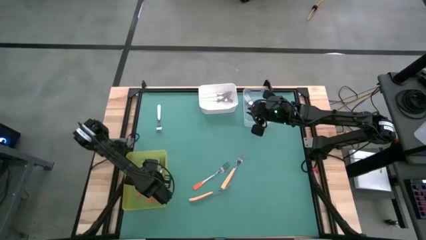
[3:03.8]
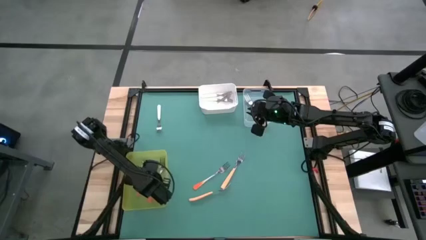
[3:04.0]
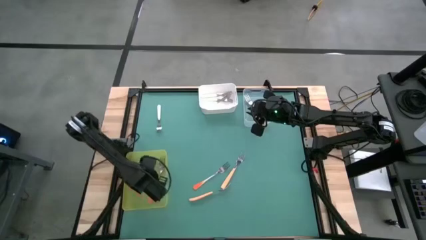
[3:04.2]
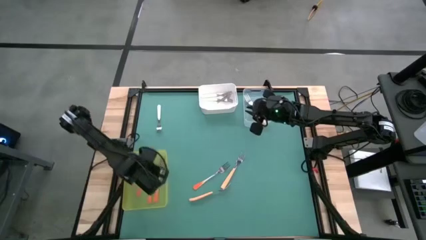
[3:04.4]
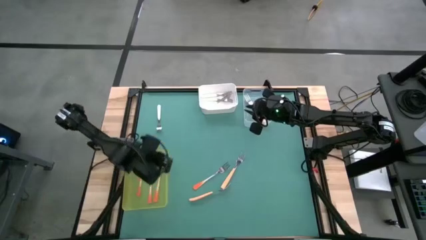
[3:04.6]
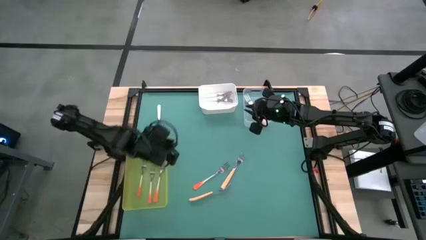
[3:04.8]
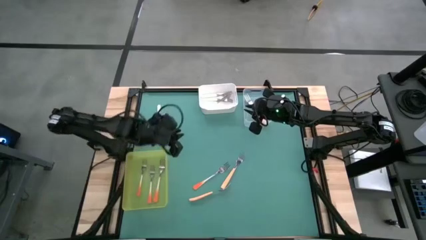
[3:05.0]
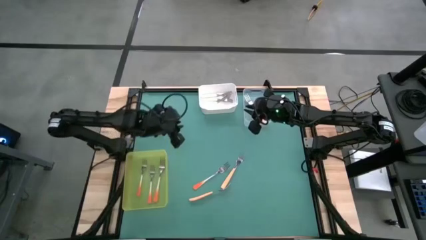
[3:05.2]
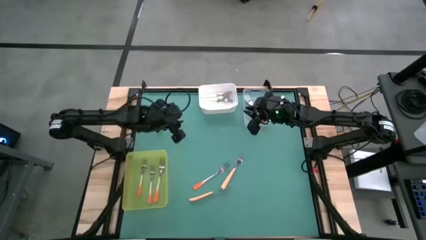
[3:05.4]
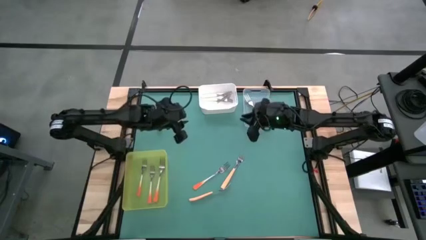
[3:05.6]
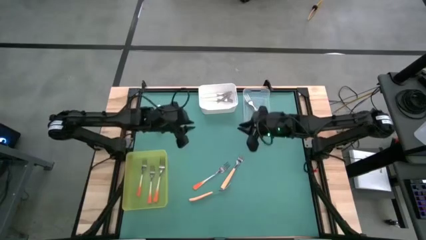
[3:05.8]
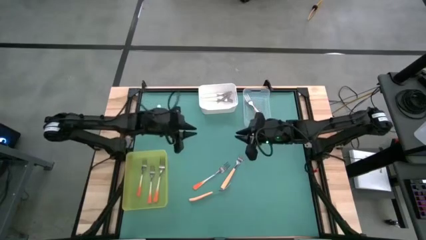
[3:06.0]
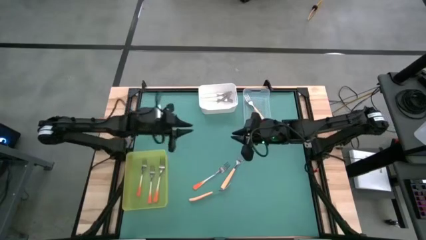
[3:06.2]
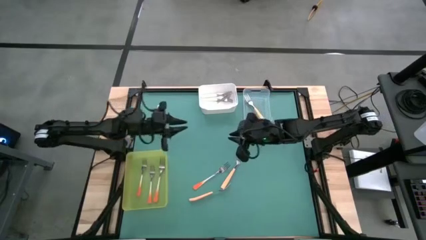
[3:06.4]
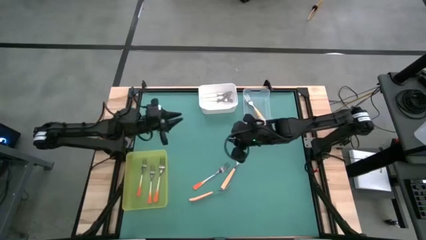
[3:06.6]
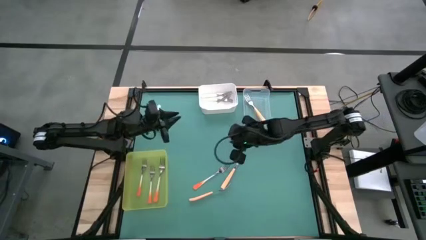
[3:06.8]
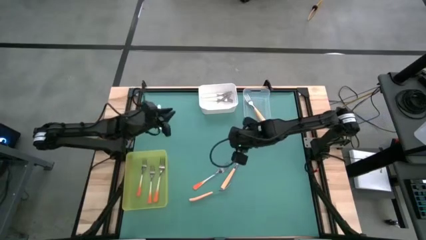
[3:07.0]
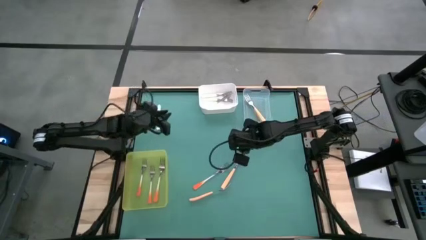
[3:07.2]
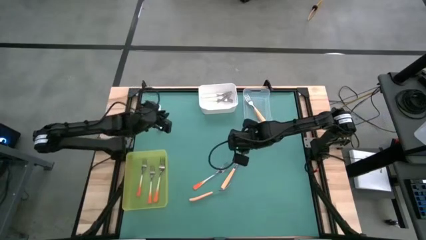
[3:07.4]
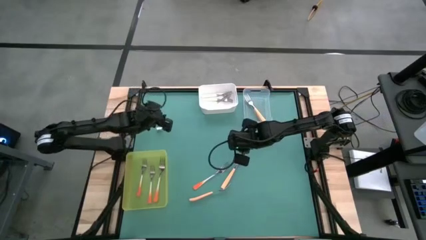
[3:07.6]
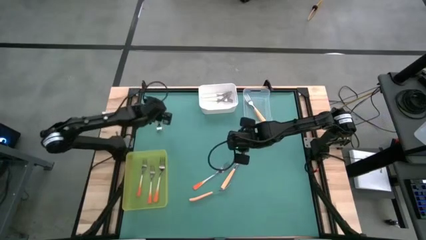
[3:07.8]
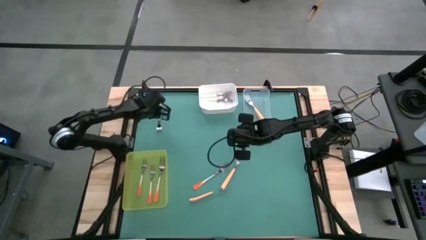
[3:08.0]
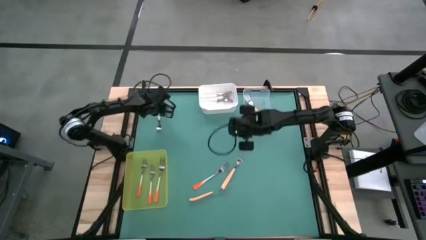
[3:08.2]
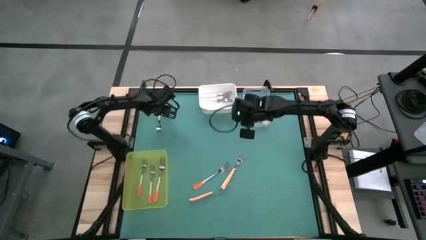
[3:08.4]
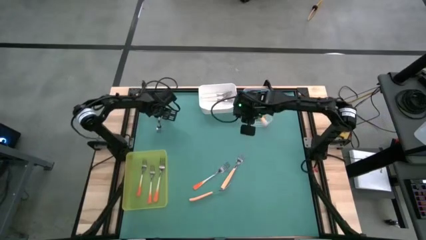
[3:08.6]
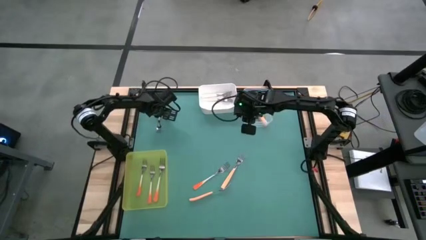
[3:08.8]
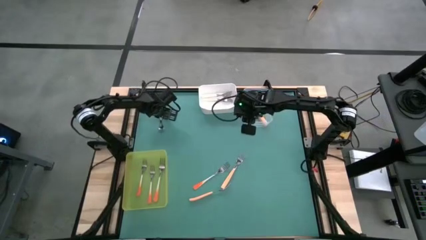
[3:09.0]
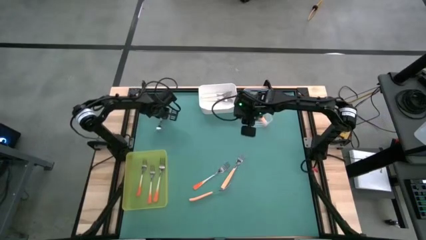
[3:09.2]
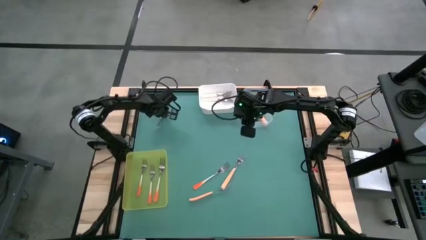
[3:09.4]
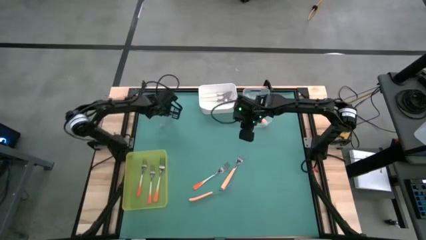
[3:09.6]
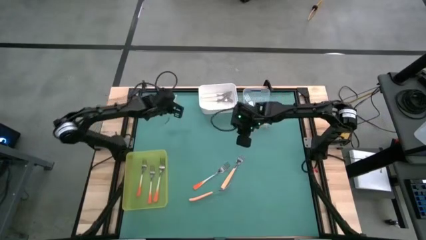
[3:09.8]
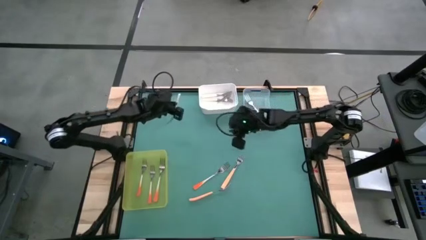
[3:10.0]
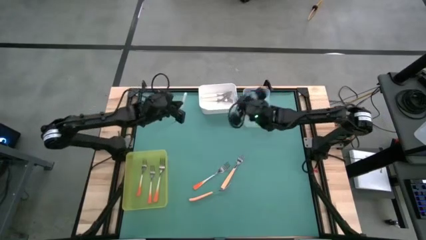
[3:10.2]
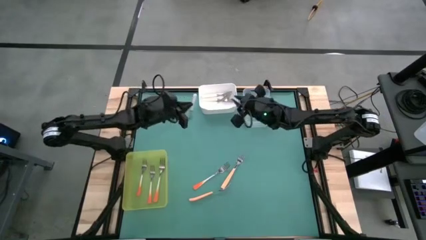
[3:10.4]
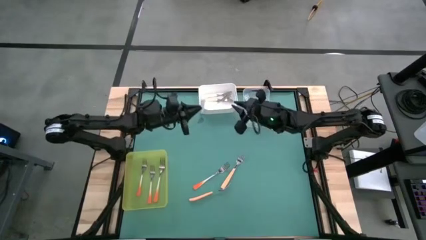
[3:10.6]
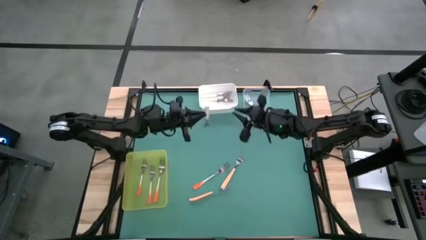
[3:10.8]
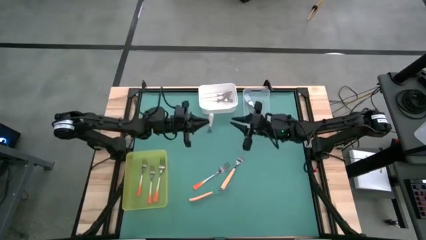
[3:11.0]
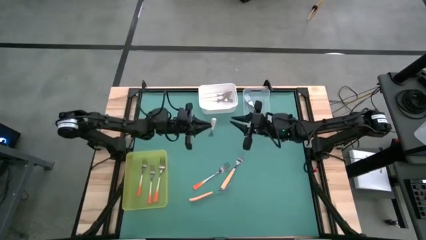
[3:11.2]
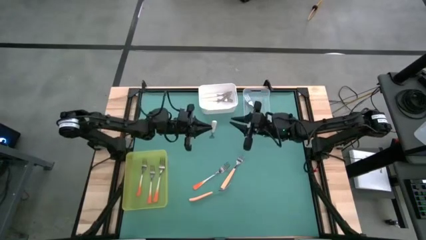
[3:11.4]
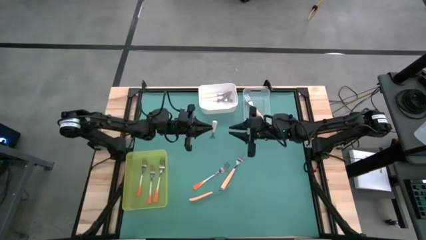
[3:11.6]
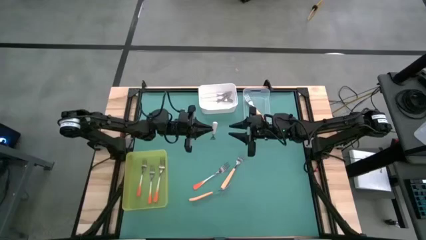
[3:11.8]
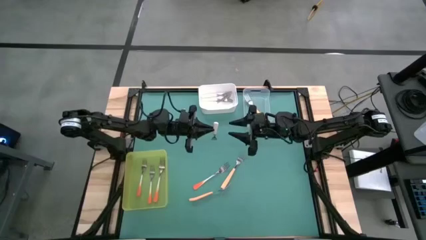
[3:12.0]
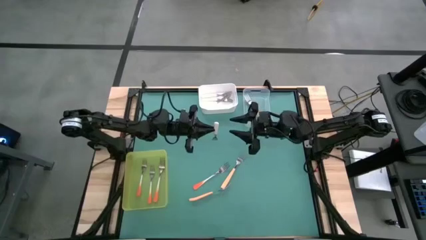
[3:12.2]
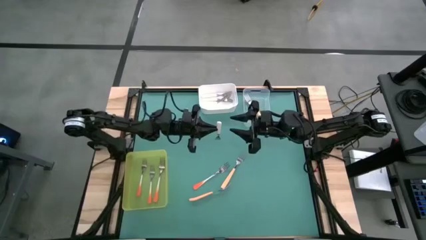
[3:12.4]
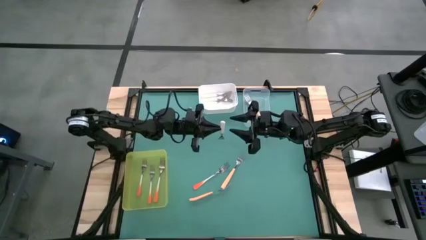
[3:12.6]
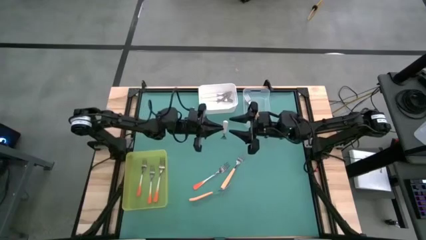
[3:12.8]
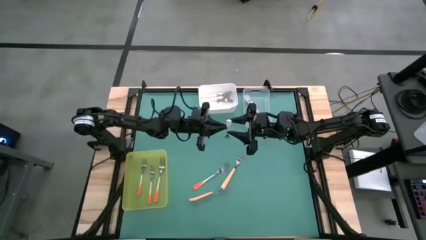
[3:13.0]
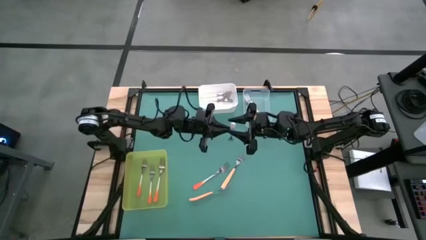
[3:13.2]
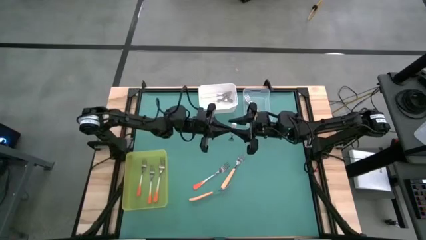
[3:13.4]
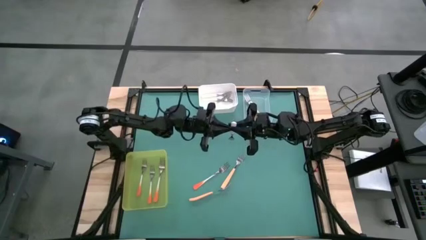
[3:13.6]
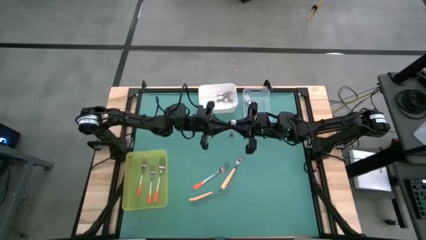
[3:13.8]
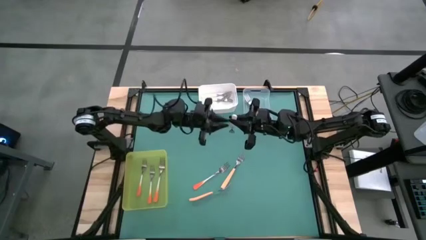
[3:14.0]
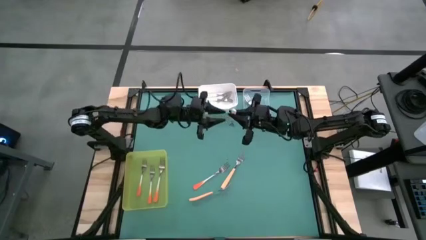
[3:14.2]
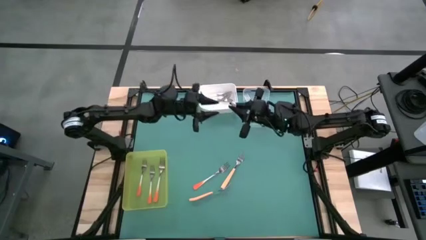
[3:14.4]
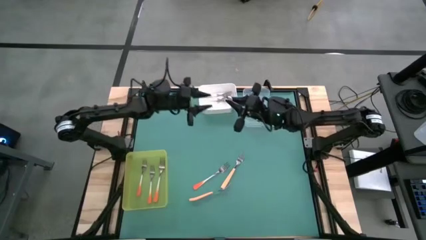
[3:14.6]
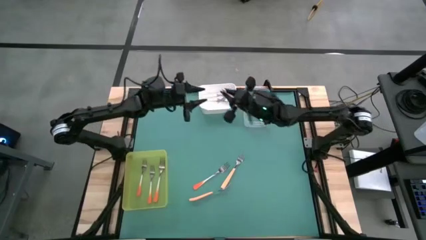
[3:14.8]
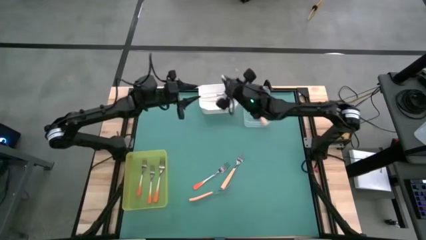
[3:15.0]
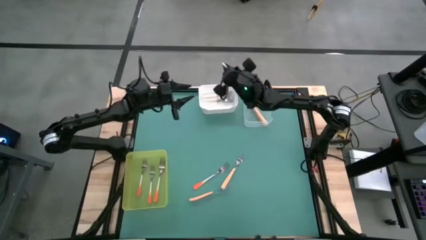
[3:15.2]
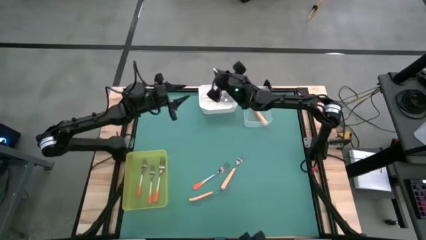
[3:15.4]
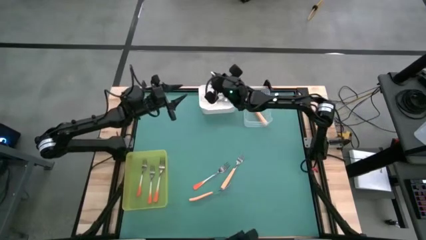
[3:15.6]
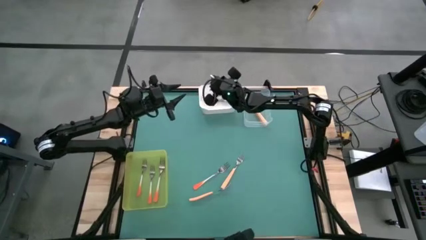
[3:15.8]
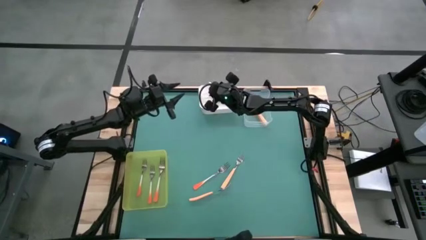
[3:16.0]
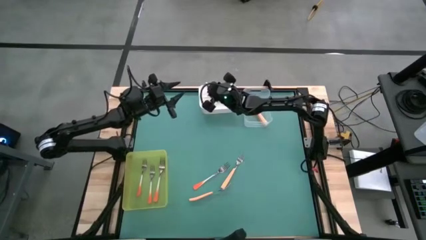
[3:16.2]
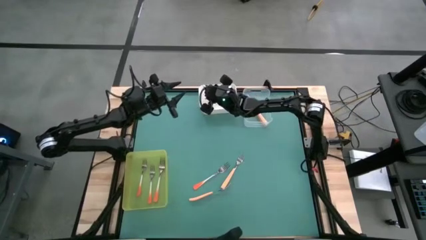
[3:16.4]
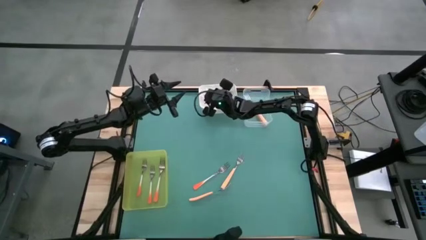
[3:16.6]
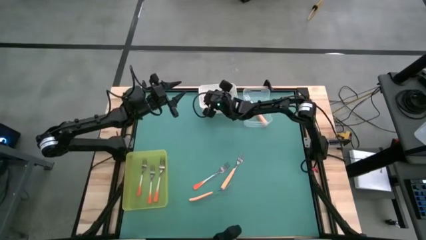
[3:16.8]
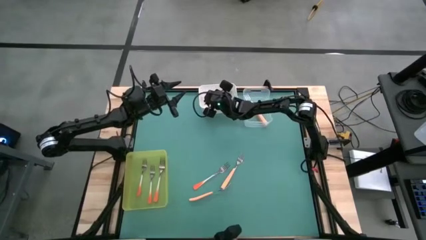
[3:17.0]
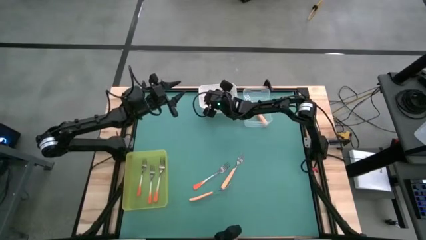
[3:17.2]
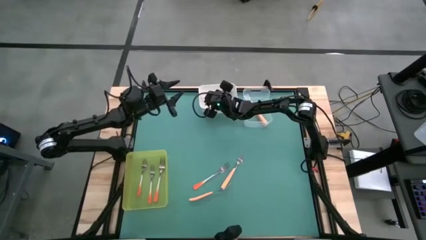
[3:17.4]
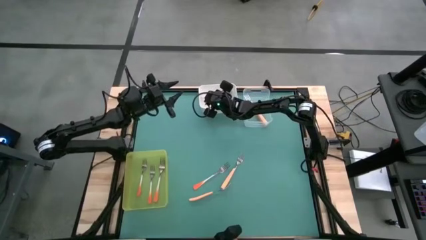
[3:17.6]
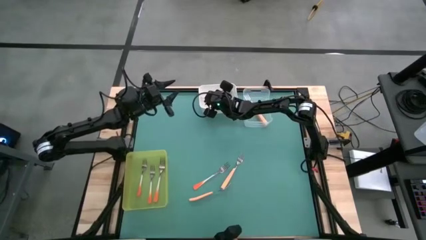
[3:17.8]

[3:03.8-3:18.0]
Task: Sort silverware by color (type)
Put the white fork into the white bin

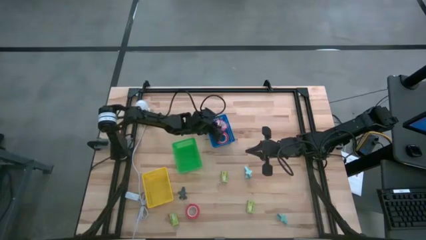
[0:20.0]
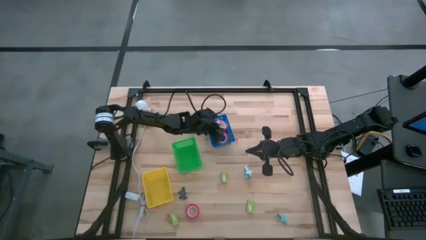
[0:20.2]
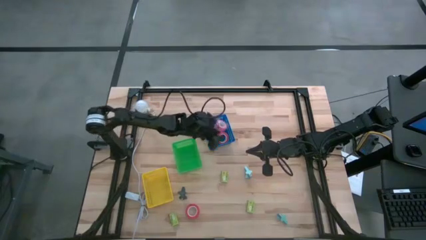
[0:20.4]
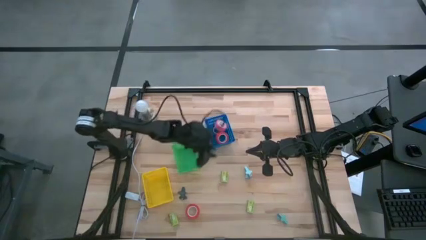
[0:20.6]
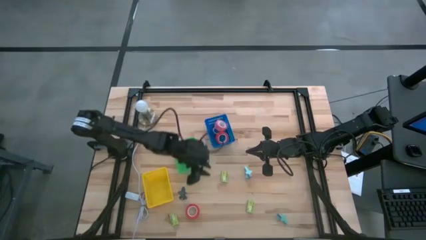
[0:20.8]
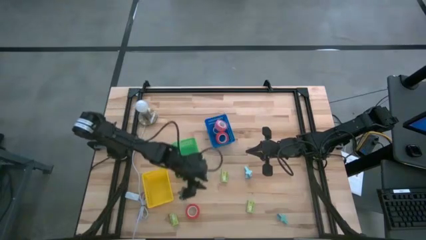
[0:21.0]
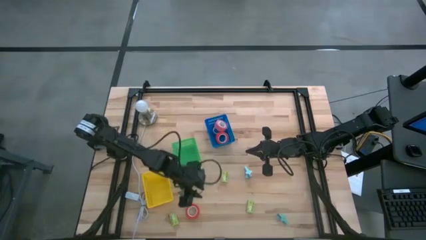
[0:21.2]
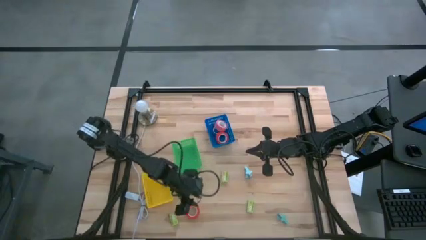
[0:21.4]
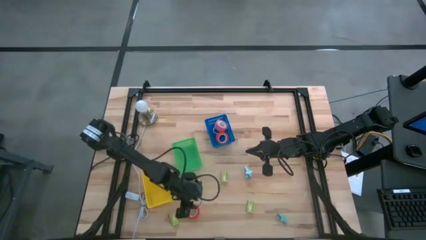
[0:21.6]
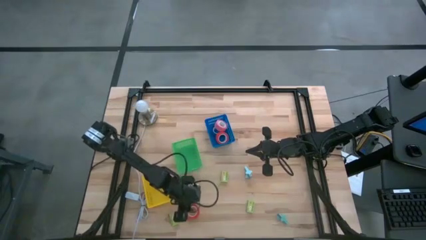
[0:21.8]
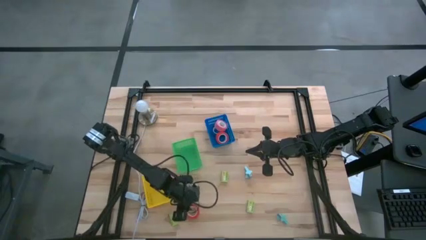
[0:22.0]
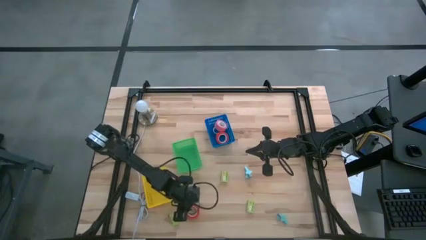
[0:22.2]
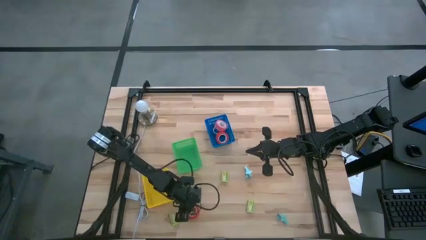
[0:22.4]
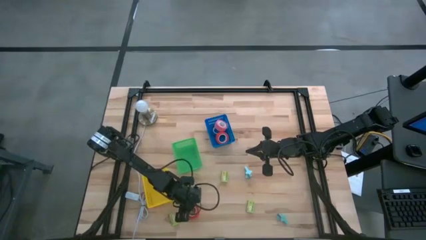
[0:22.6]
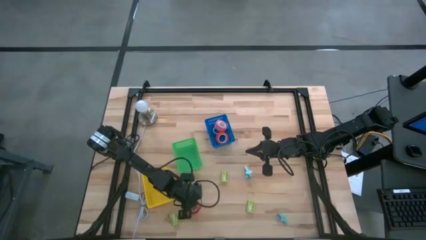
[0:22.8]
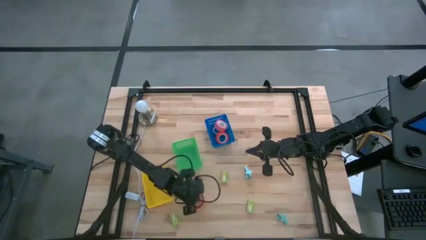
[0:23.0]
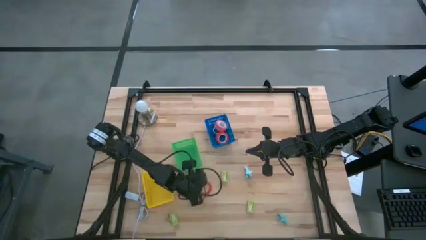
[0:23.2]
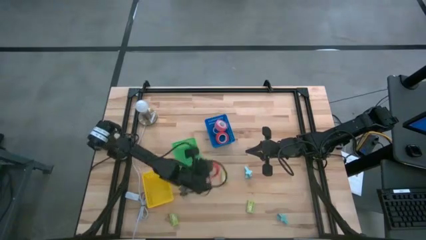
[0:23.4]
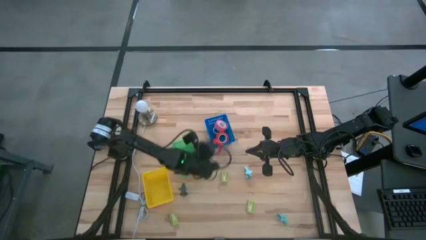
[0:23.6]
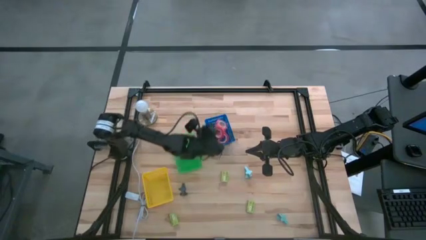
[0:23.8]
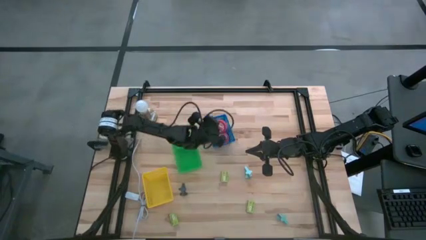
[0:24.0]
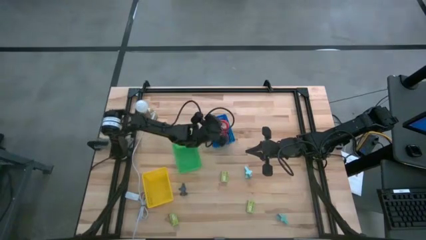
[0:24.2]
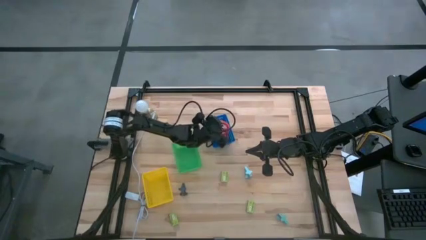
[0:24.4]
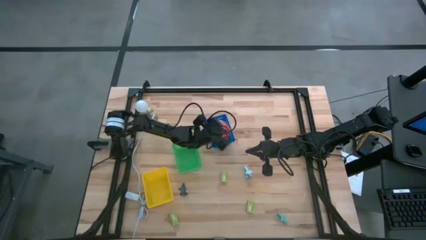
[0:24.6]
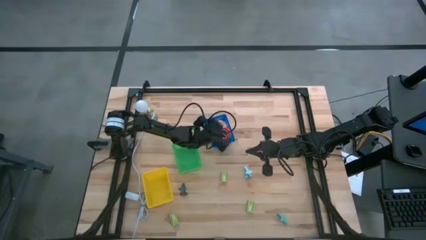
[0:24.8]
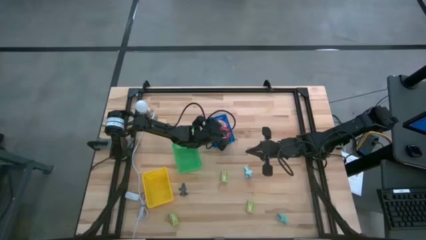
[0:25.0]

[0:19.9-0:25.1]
Task: Pick and place Stapler, Stapler remover, tape
Put the orange tape into the blue basket
